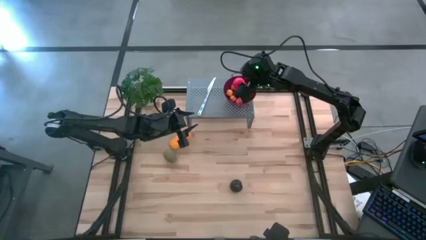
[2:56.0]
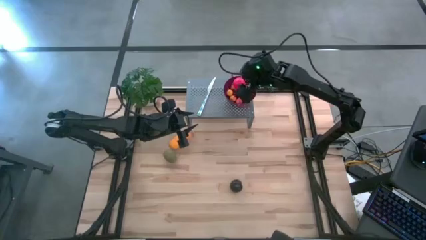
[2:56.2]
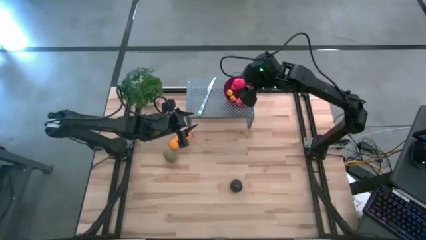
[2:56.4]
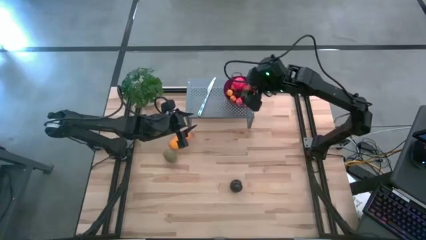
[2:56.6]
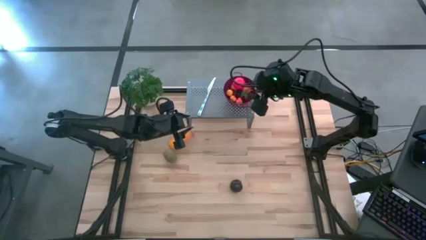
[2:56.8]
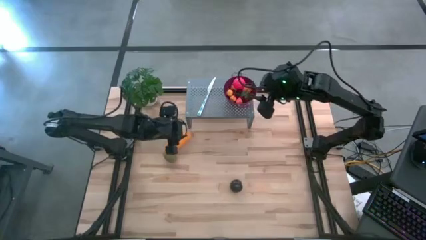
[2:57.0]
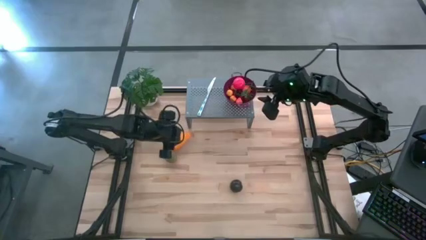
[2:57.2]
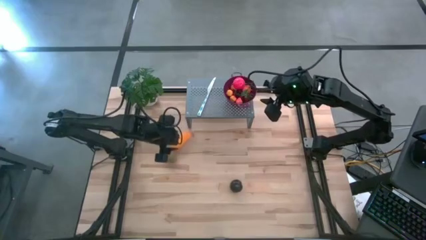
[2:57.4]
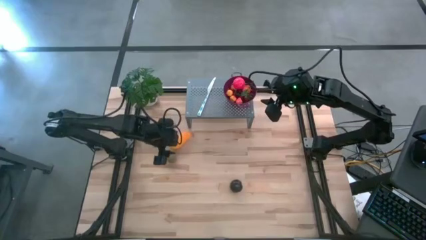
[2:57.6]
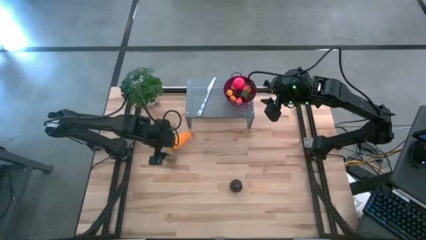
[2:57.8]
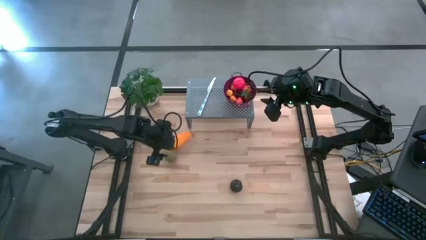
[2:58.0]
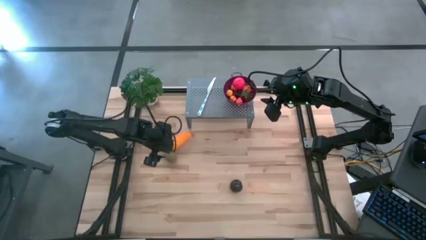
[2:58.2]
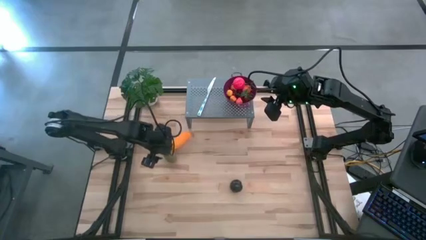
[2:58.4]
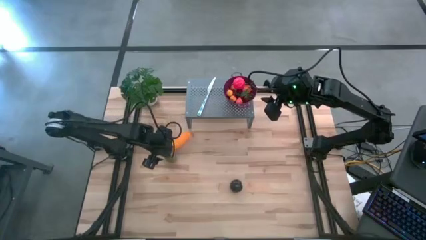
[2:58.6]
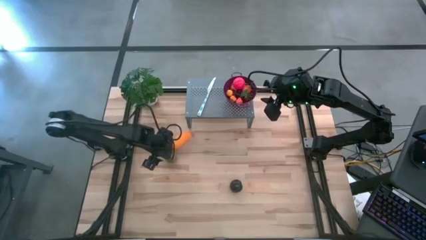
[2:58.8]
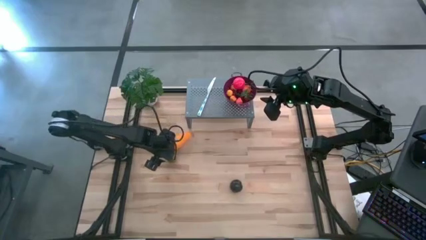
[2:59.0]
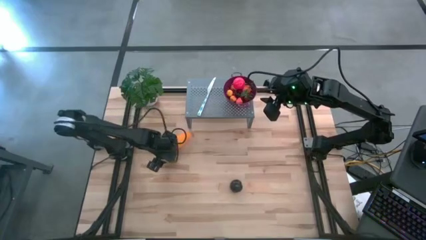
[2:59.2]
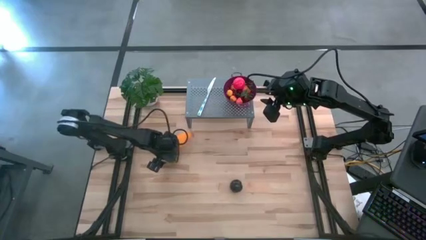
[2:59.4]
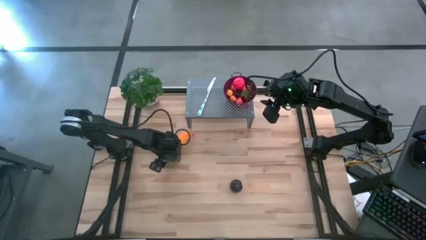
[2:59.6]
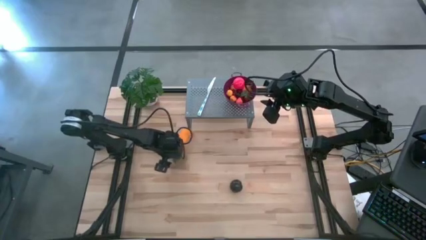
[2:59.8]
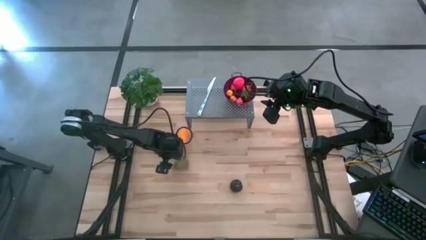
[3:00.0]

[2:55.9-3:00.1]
Task: Pick & Place Fruit
Put the brown kiwi into the violet strainer bowl on the shelf

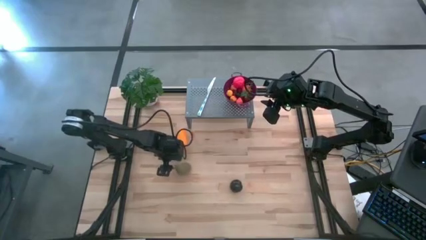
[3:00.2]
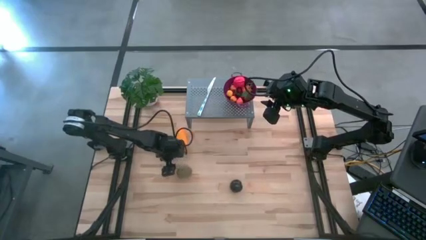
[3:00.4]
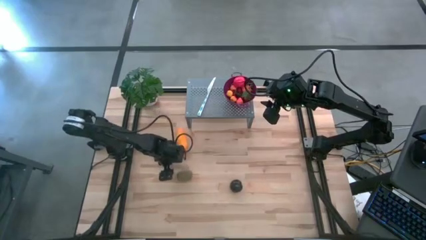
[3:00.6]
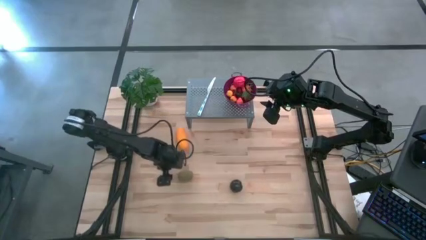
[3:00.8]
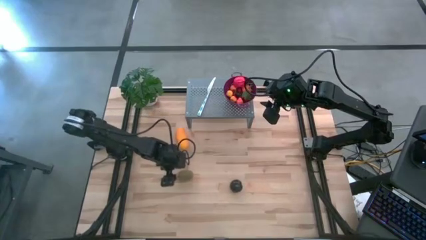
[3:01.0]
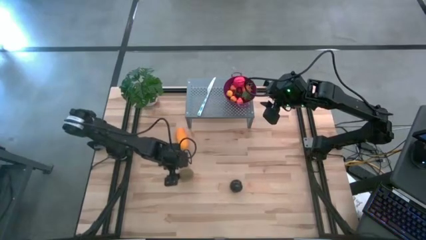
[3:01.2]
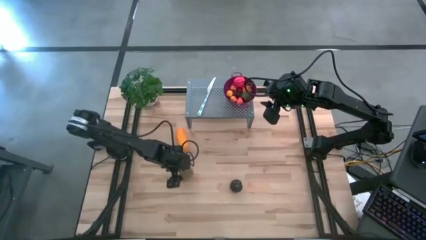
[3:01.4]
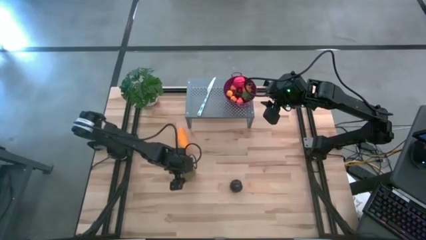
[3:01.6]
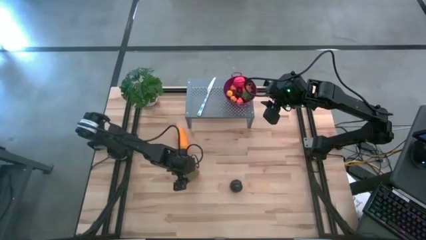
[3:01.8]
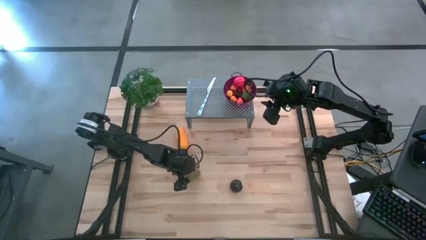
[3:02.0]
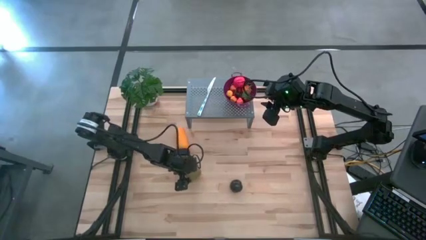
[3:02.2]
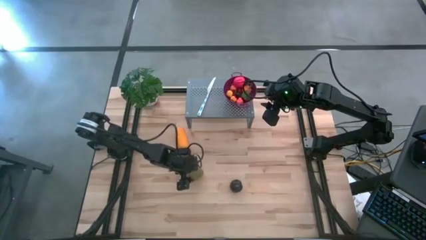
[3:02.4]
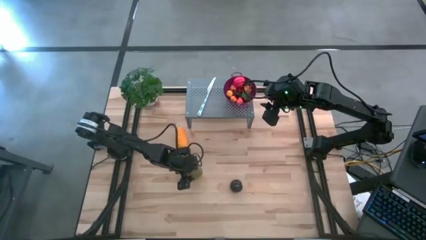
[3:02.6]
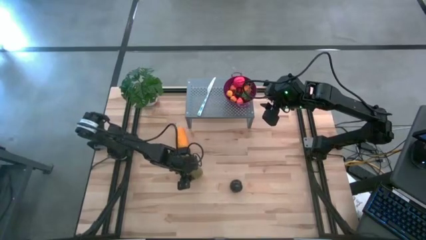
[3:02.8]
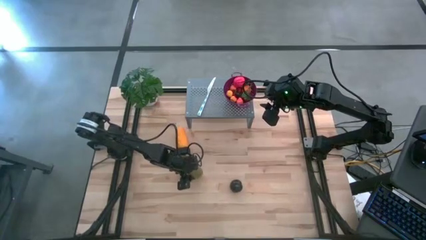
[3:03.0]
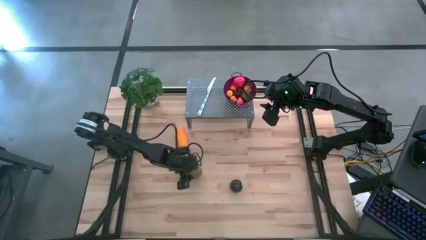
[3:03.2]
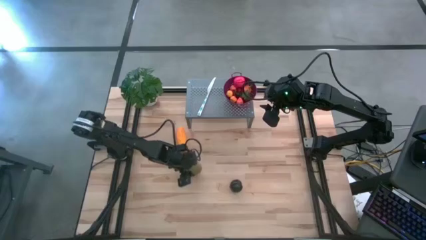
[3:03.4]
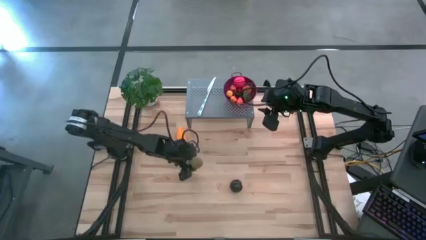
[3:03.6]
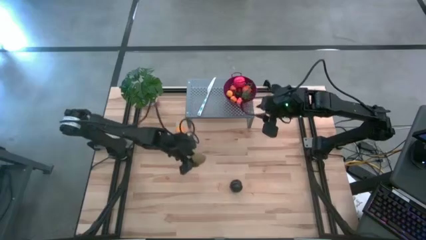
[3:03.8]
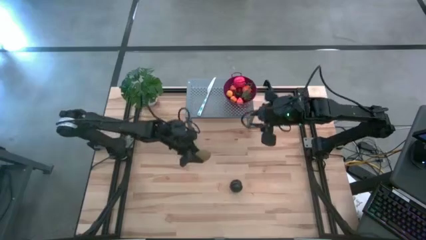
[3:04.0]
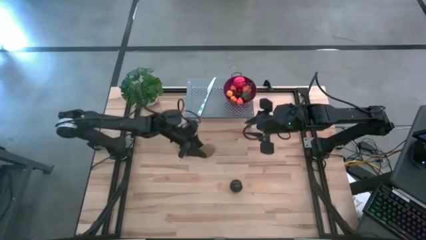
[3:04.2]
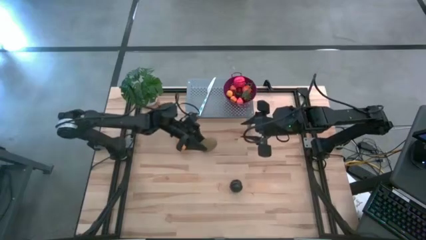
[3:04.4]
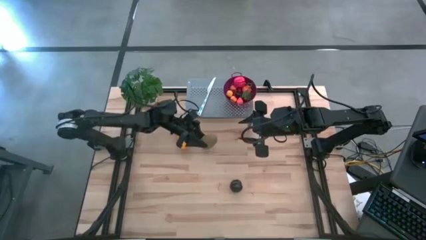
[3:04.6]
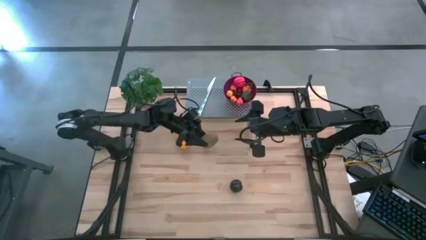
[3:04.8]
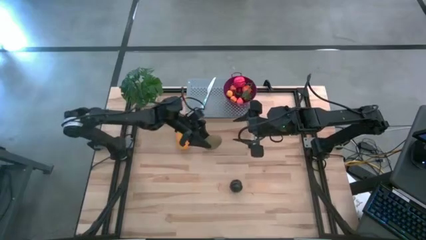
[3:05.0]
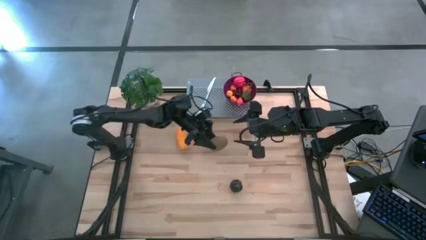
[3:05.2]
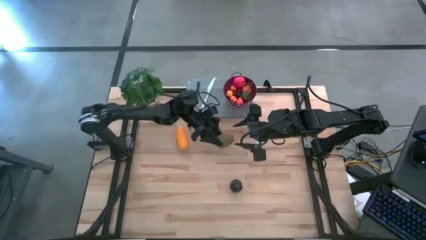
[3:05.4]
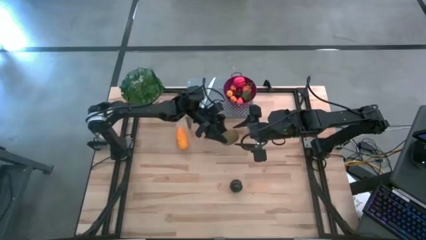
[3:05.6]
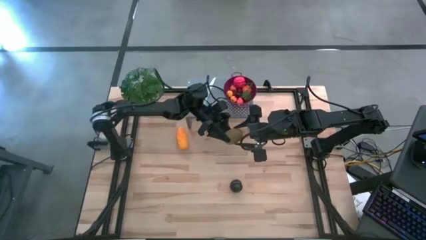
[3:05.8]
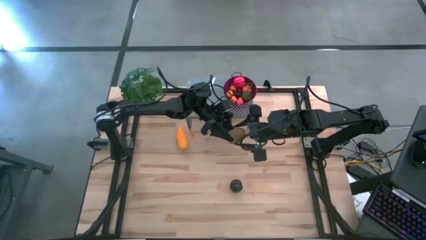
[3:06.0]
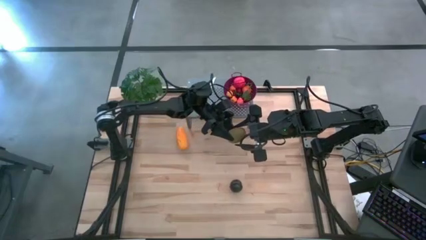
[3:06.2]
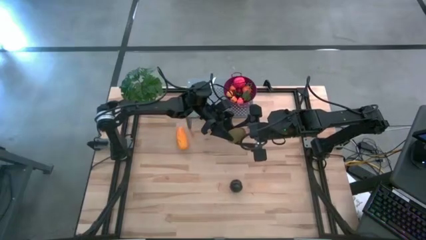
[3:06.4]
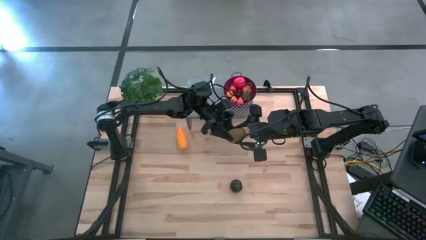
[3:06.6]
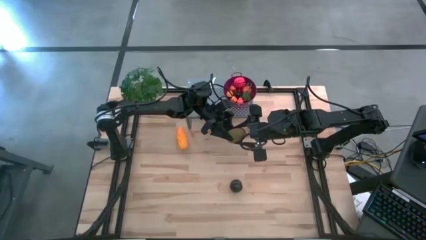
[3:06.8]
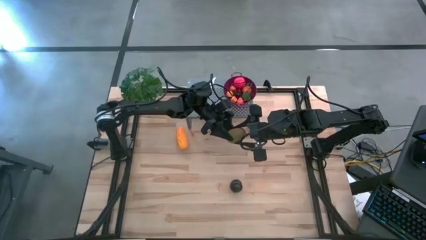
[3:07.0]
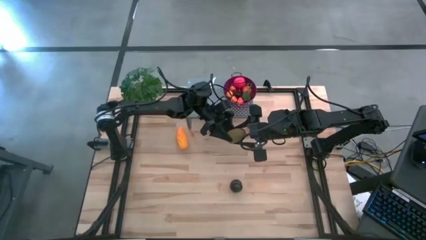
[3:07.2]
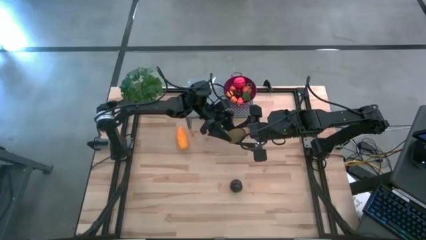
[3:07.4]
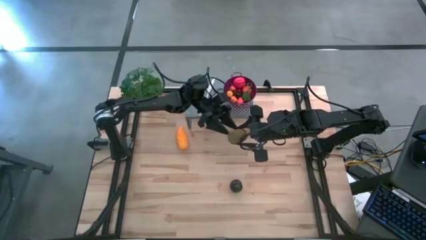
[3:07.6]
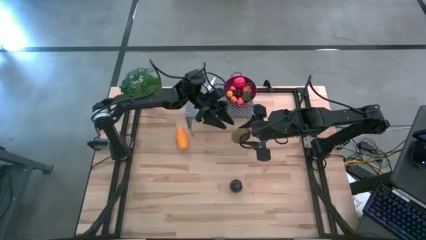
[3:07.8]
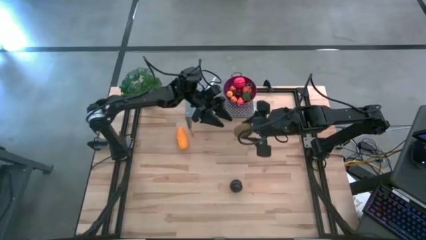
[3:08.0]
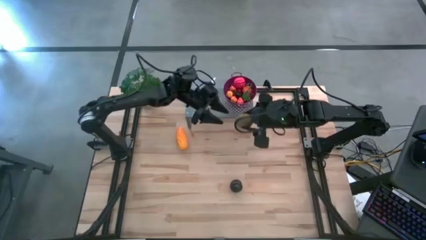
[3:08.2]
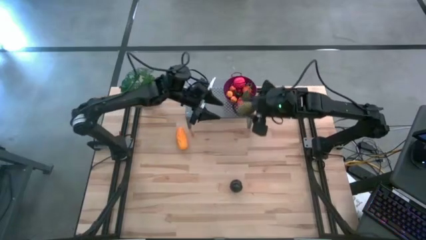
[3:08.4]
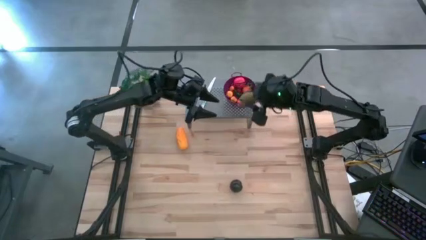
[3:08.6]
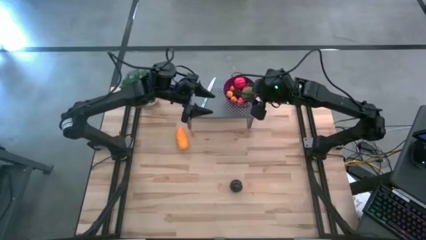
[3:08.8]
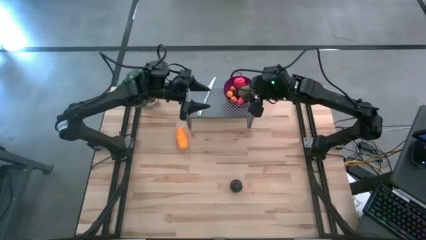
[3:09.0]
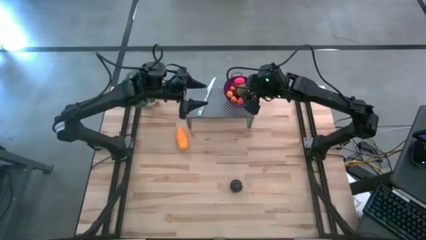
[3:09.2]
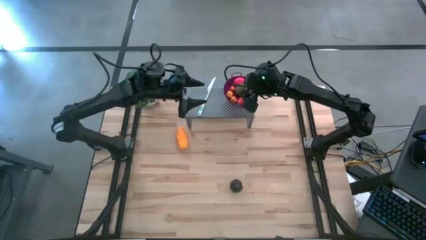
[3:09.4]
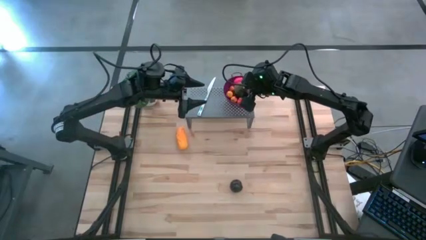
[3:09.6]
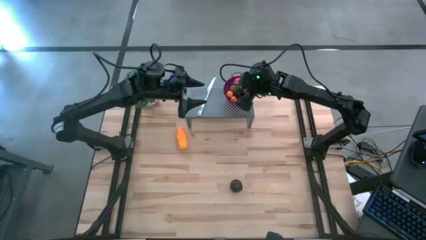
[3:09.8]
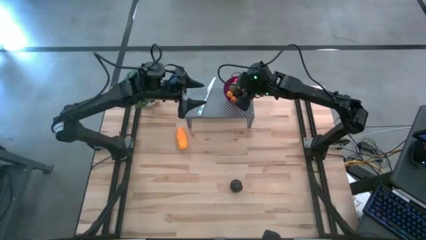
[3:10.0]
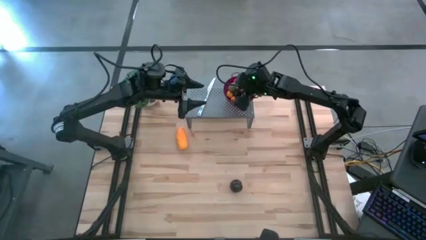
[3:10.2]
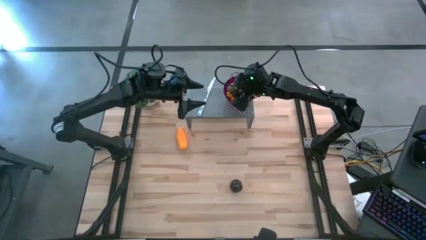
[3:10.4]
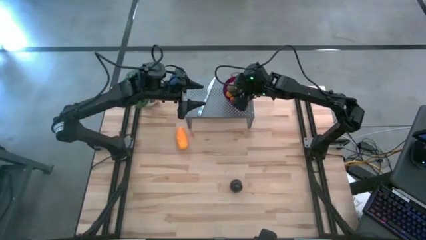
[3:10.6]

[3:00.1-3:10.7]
Put the brown kiwi into the violet strainer bowl on the shelf
